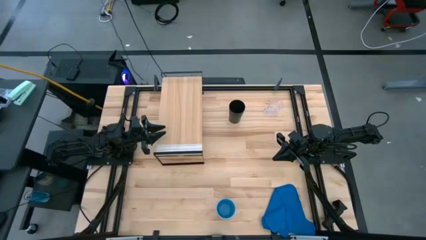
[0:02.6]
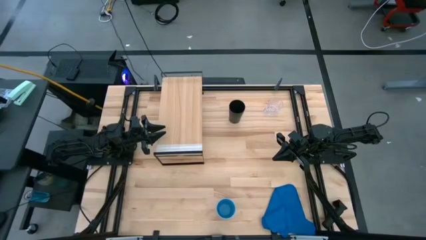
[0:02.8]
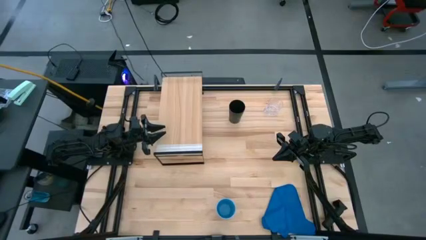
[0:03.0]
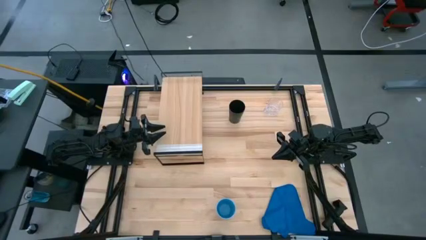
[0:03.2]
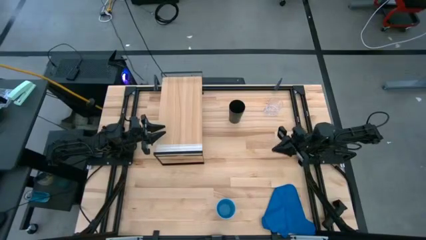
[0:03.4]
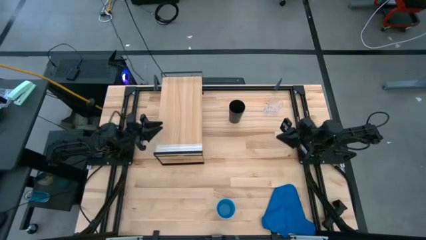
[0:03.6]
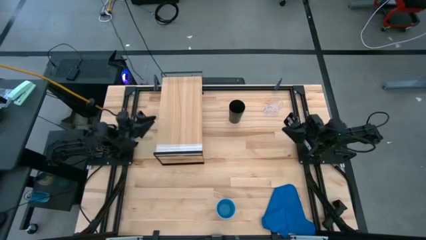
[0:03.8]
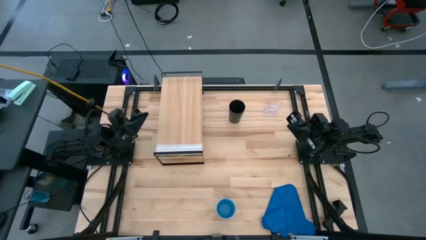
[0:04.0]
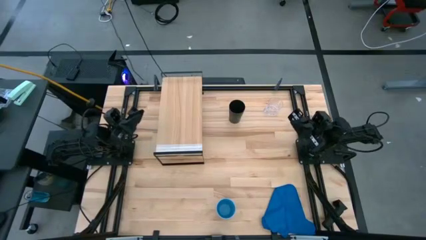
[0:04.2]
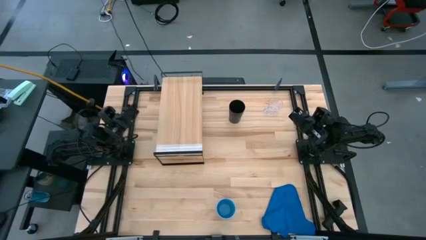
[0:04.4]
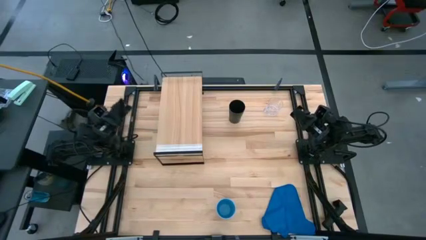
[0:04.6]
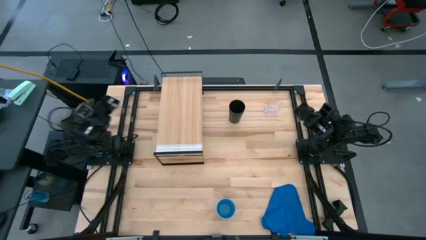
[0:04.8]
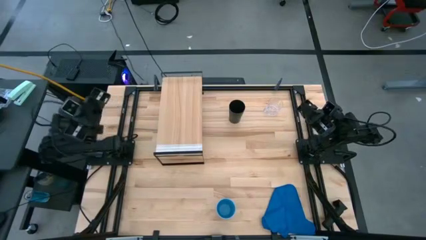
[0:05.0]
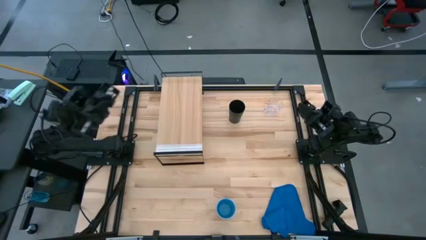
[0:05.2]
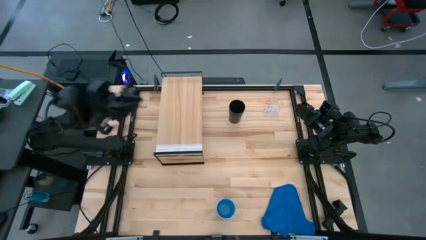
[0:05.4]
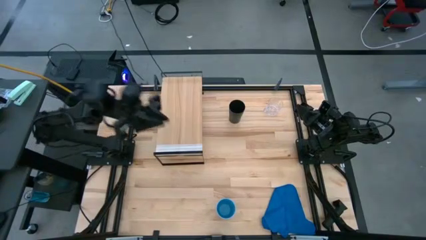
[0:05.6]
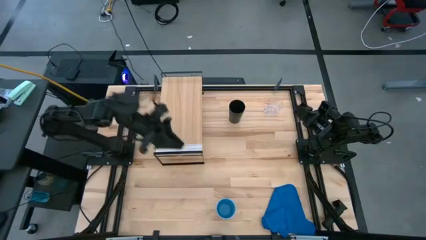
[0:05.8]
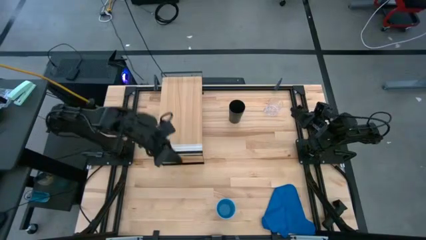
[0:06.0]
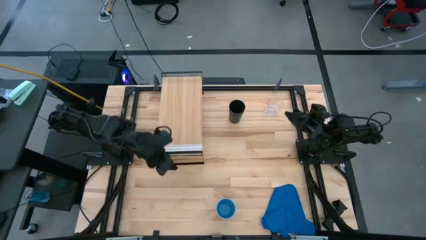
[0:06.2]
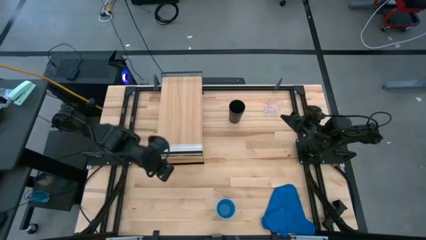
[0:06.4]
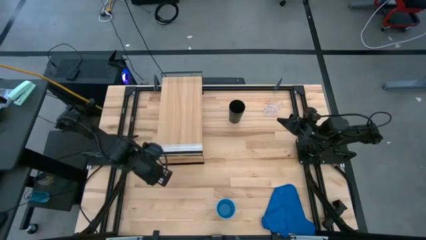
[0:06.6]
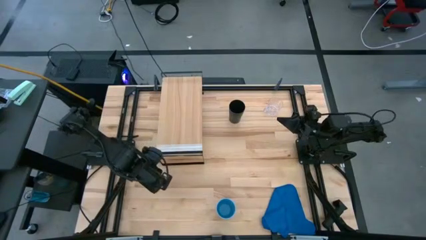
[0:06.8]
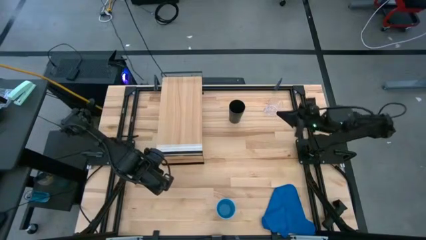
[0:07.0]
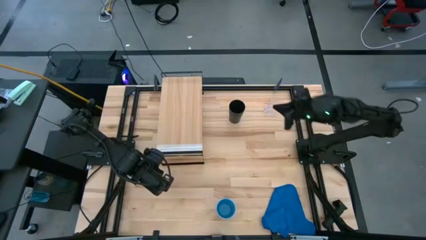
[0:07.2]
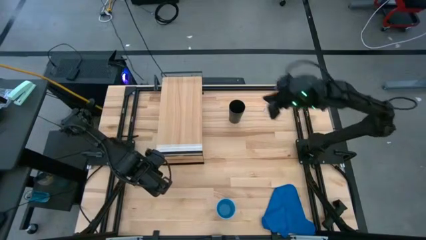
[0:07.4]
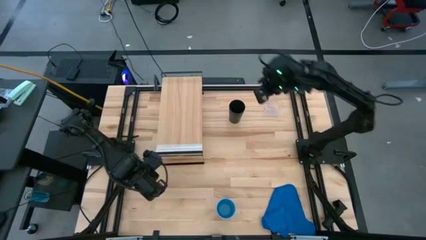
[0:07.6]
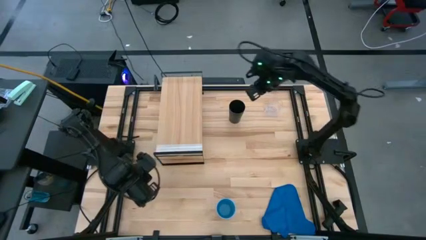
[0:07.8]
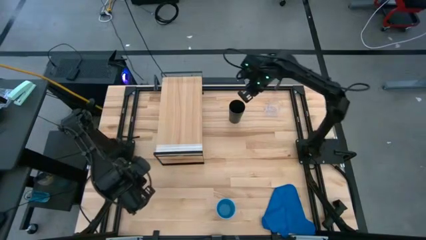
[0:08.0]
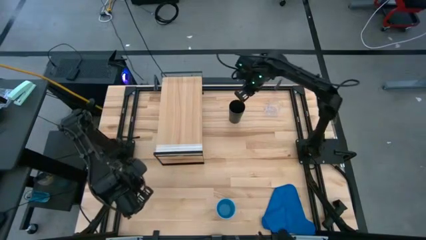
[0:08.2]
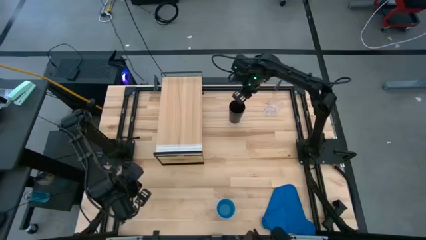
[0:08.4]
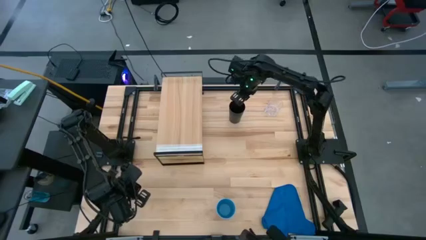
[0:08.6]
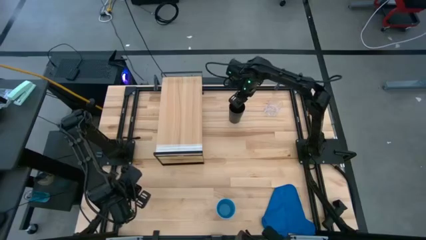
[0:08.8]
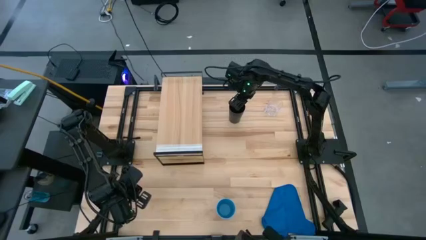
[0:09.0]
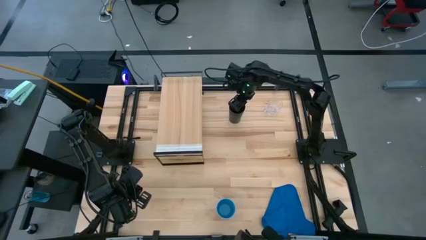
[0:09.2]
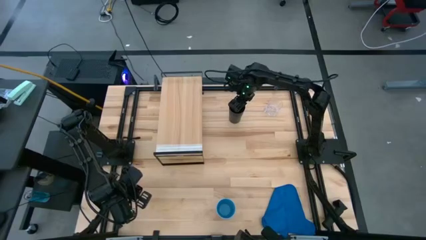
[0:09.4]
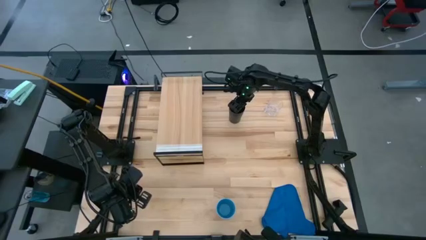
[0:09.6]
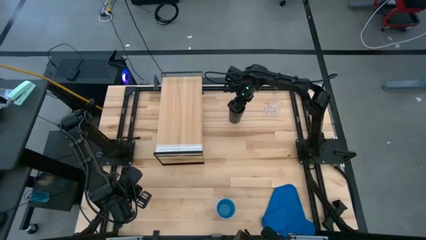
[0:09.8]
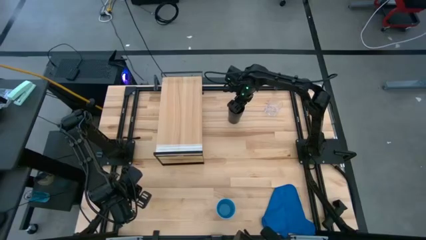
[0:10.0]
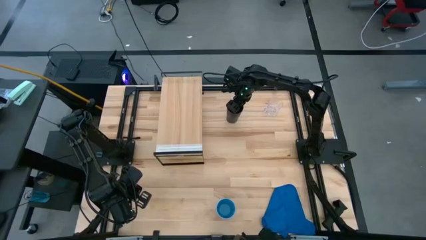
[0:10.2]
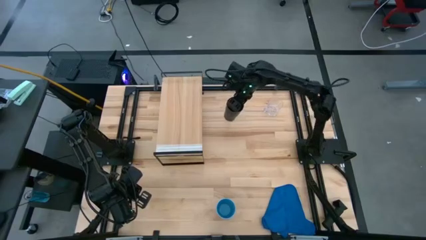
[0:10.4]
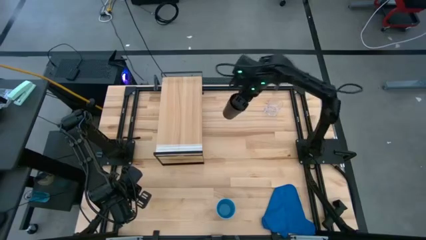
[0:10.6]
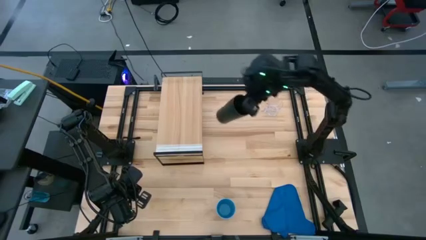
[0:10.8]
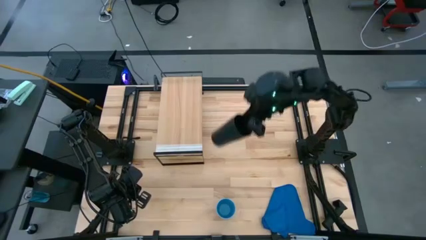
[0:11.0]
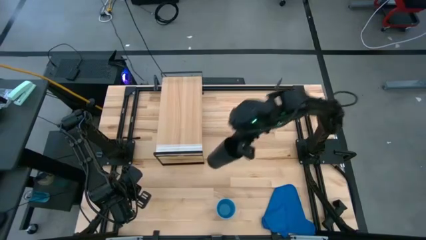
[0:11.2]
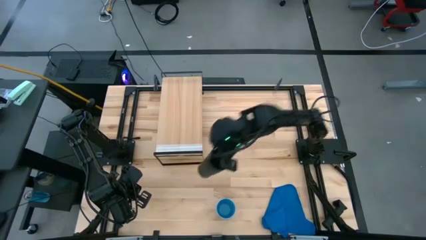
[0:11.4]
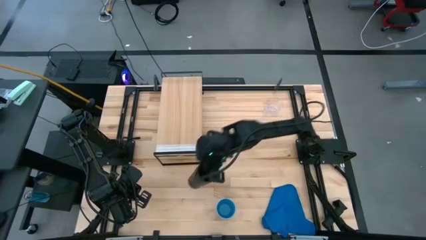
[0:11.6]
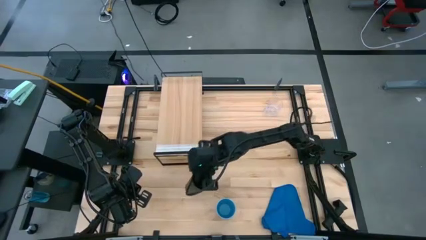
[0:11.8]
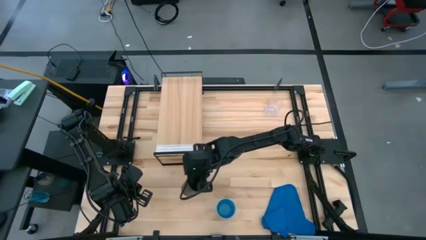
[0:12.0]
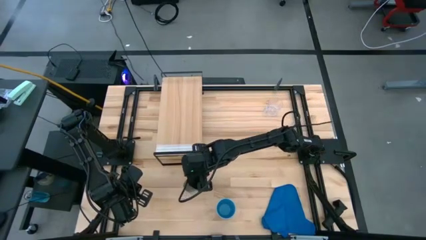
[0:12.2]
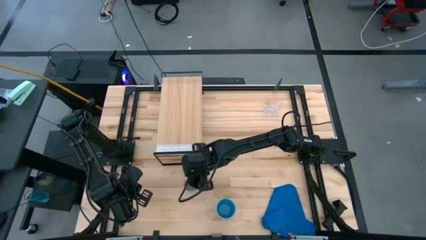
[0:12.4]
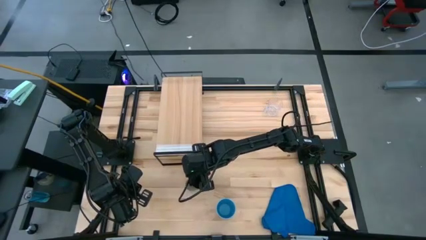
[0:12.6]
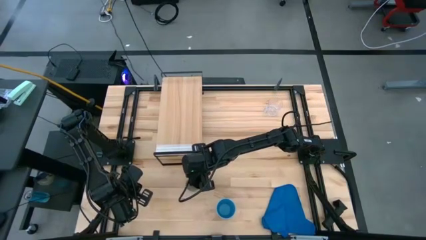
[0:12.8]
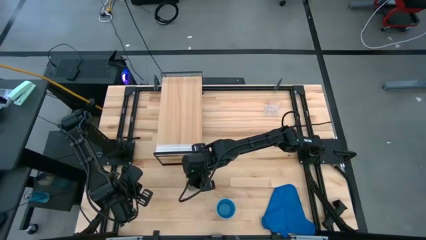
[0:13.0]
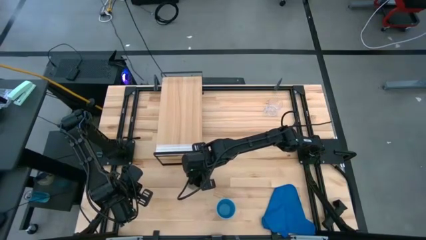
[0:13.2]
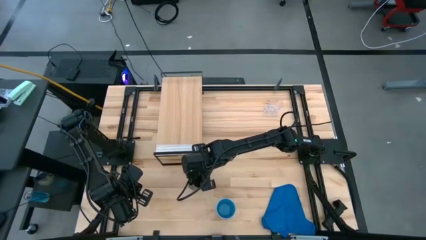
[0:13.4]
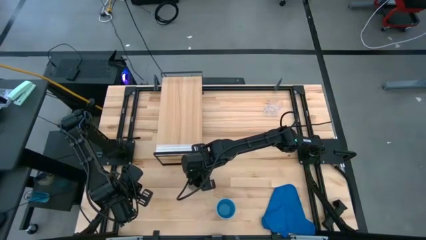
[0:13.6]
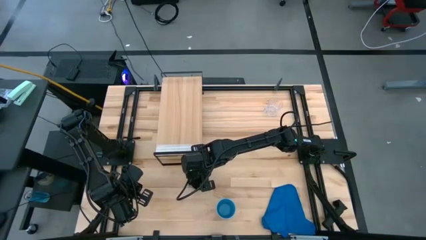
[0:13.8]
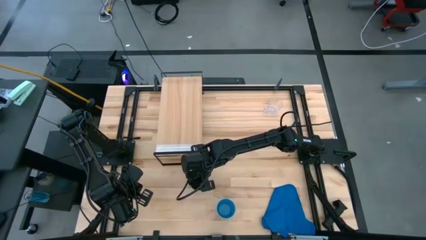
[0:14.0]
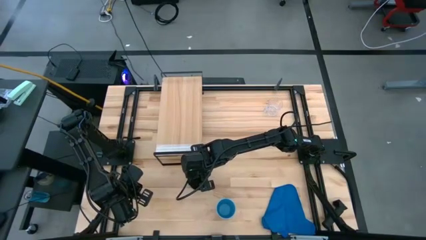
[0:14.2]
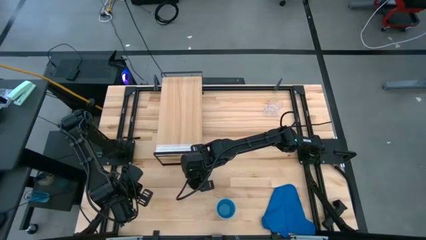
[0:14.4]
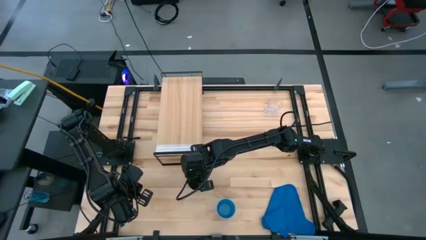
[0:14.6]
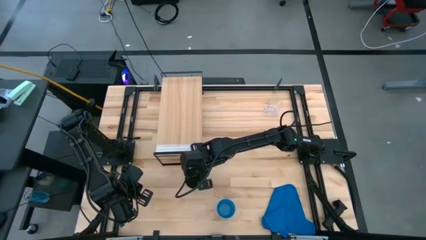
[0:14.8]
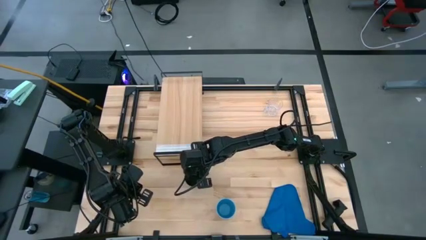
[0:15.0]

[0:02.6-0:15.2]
Task: Stack small to large cups/mugs on shelf
Move the black cup to the bottom of the table
